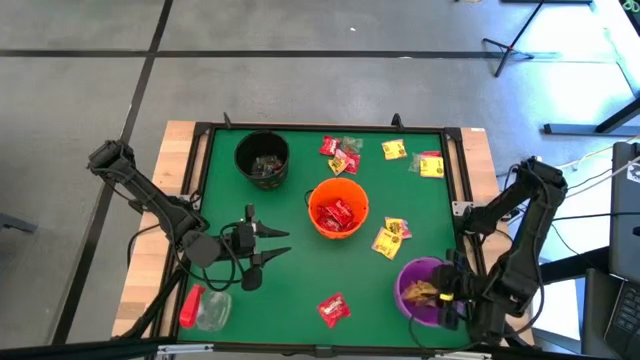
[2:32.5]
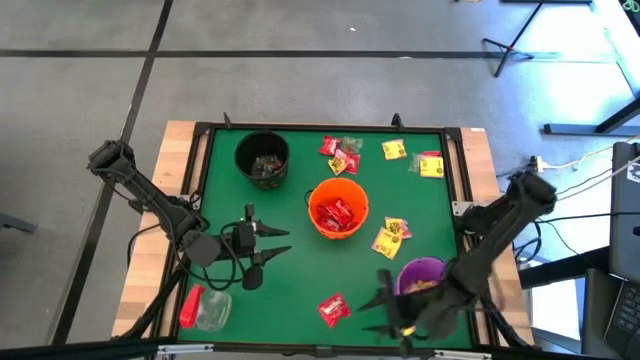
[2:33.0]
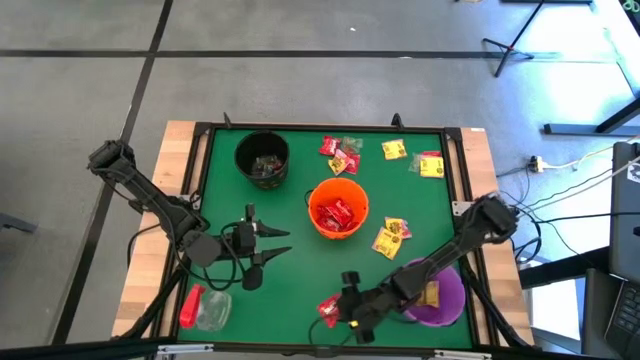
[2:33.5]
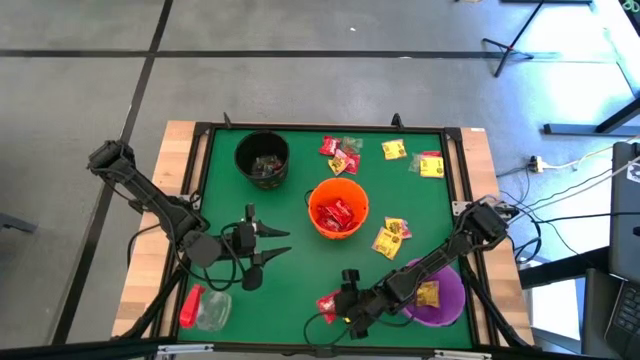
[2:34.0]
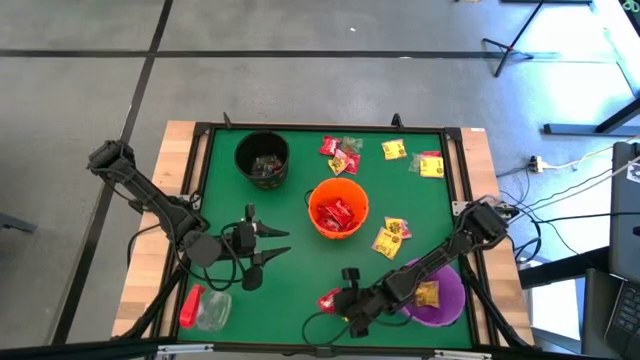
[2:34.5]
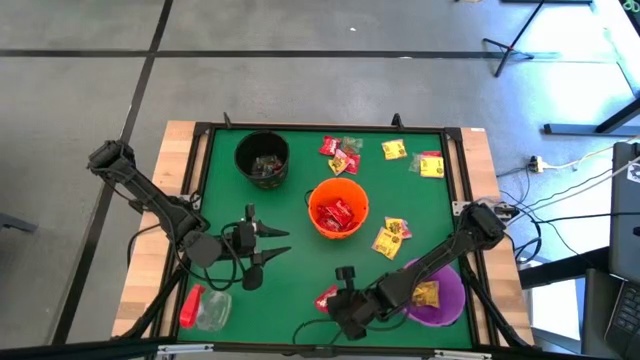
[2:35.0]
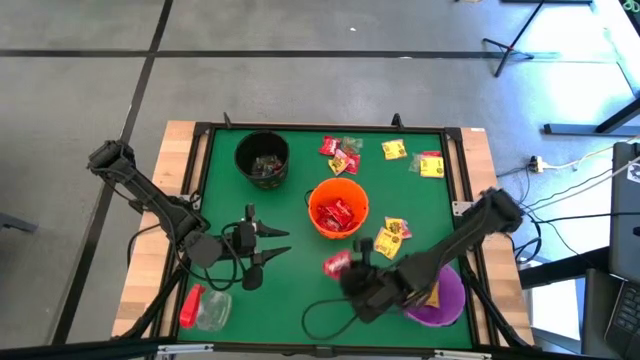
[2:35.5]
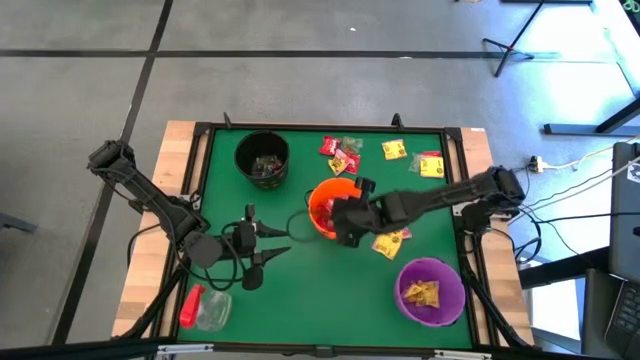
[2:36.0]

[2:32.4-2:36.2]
Task: Sort candy
Put the red candy into the orange bin

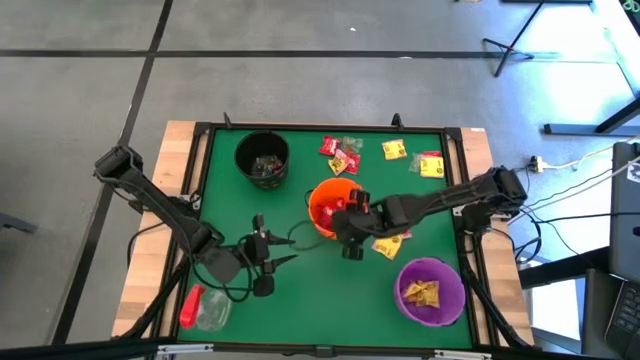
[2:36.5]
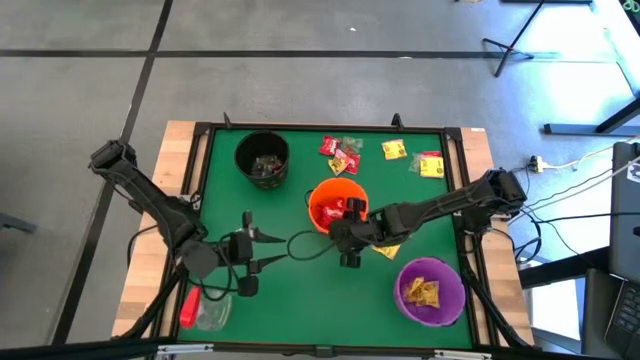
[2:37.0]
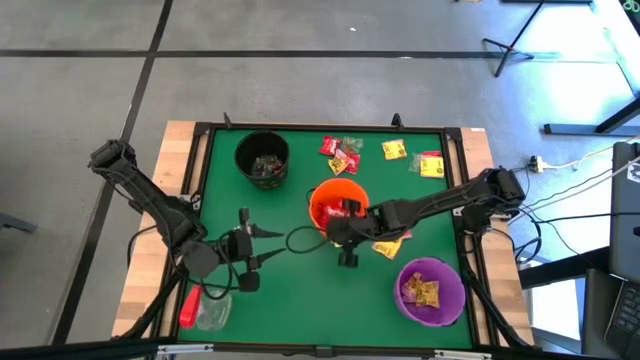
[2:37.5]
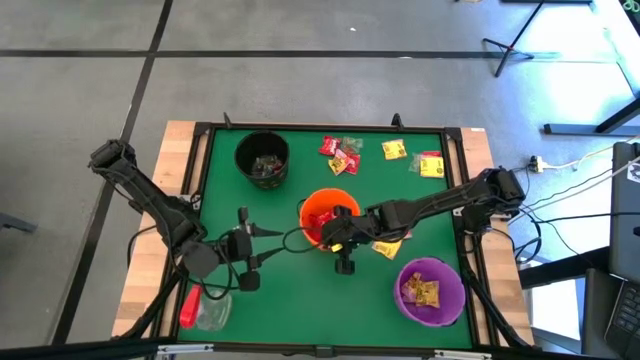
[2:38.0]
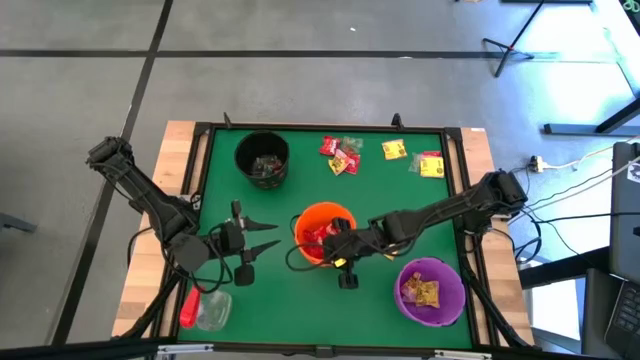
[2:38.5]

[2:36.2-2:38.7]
Adjust the orange bin

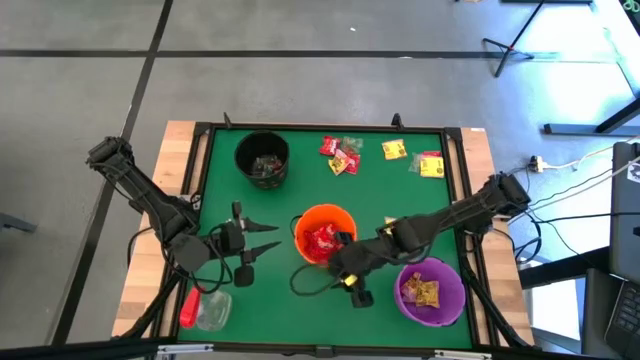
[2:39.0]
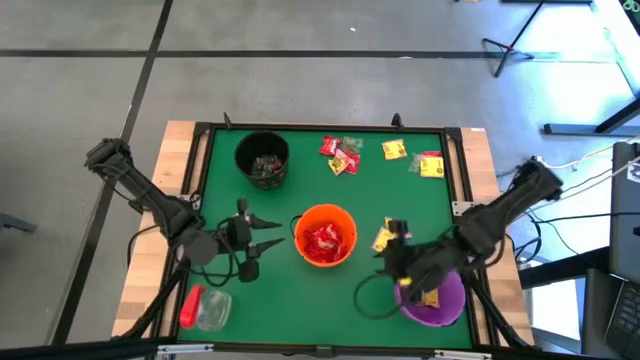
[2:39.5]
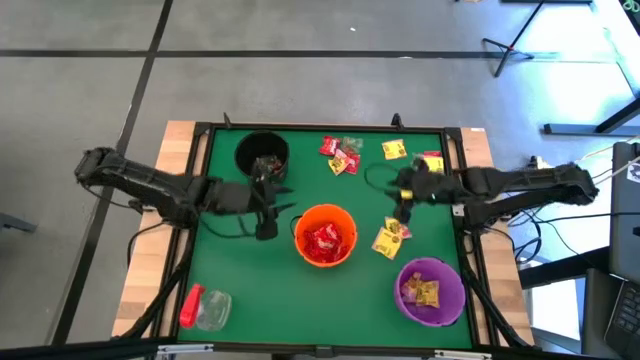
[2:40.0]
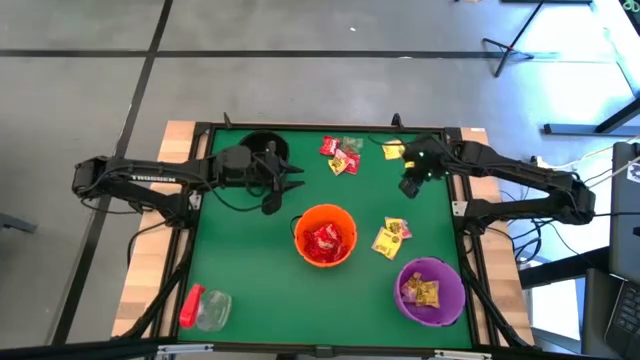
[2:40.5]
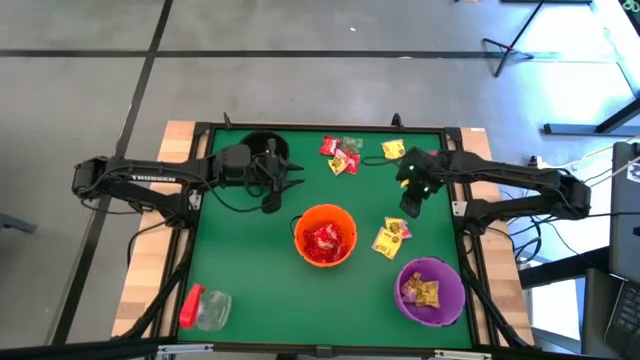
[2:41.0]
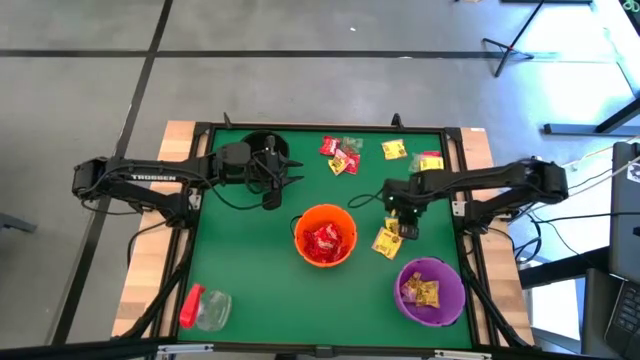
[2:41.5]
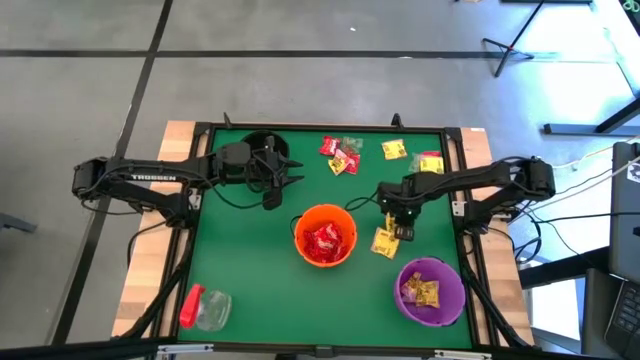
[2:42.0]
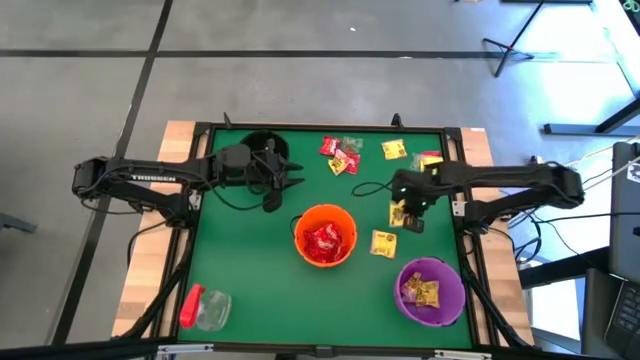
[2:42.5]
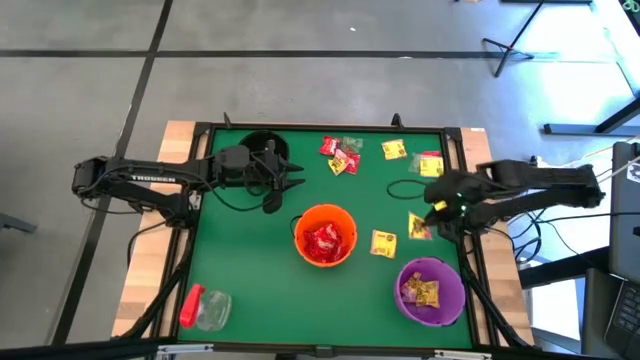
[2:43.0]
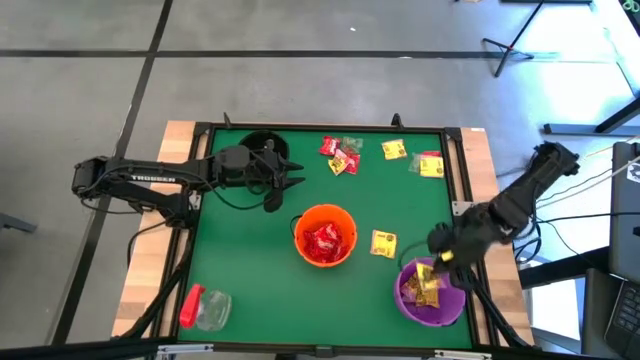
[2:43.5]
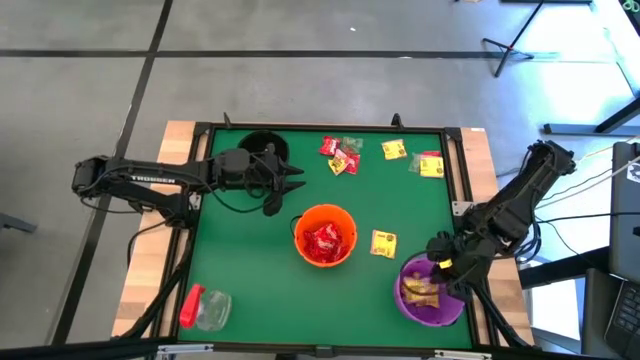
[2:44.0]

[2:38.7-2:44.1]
Put the yellow candy into the purple bin

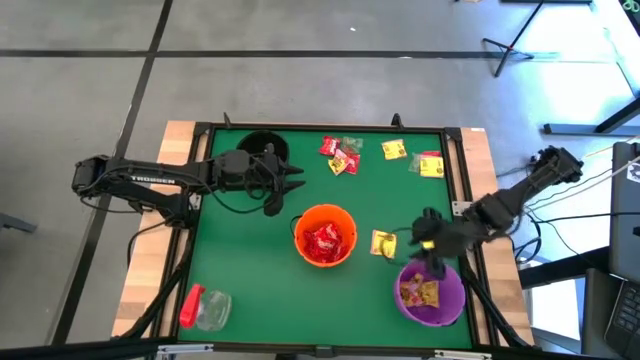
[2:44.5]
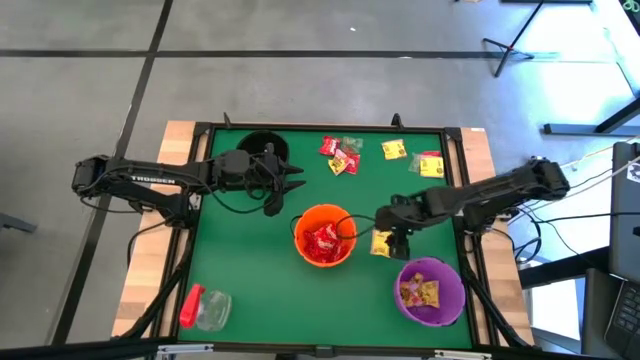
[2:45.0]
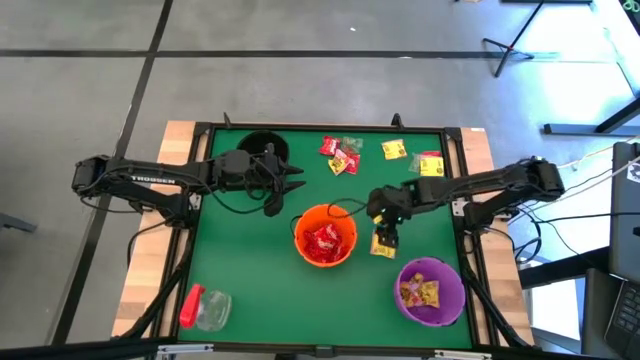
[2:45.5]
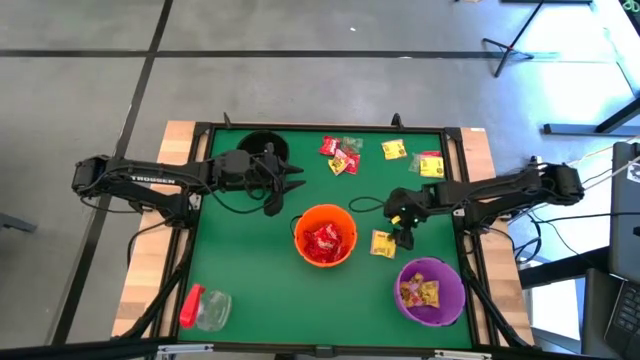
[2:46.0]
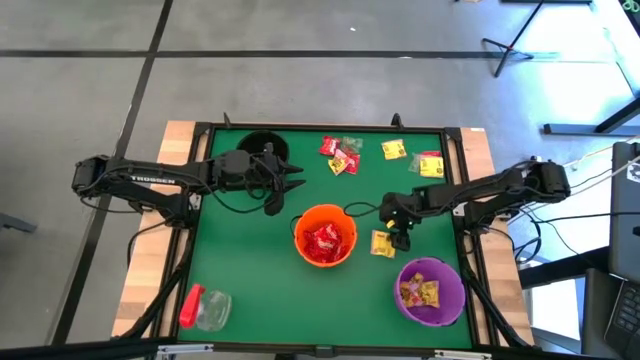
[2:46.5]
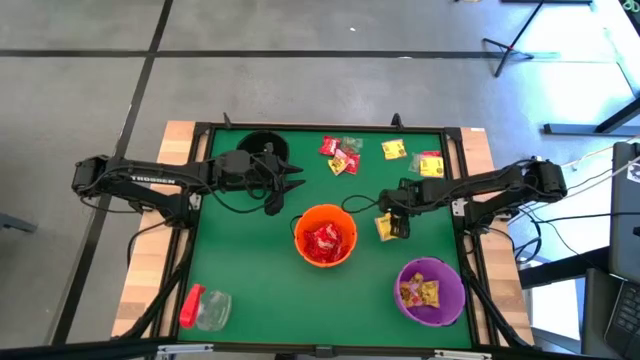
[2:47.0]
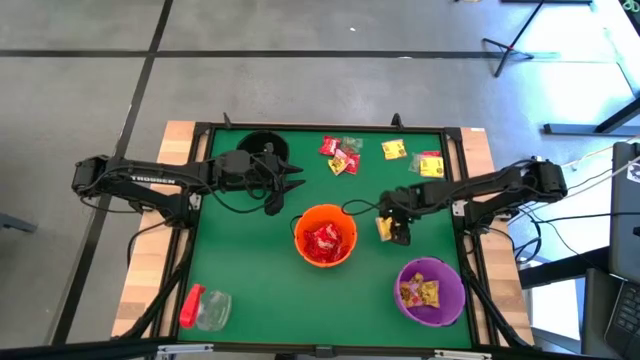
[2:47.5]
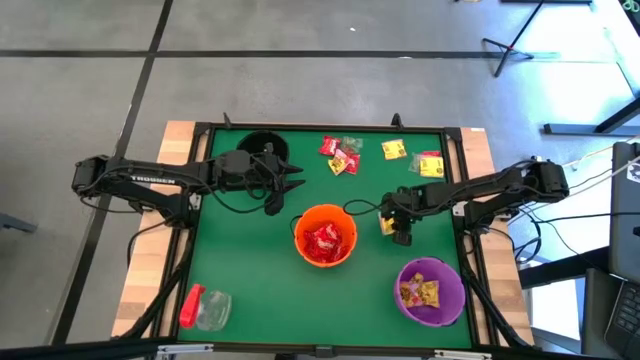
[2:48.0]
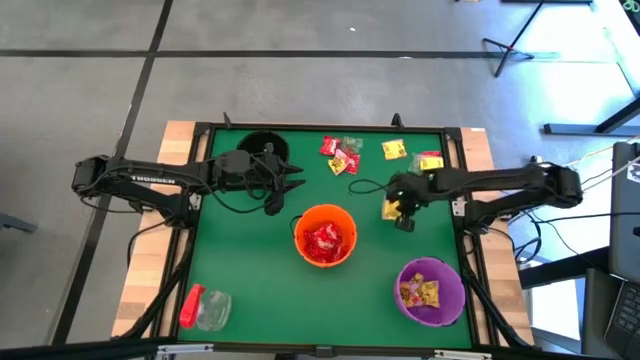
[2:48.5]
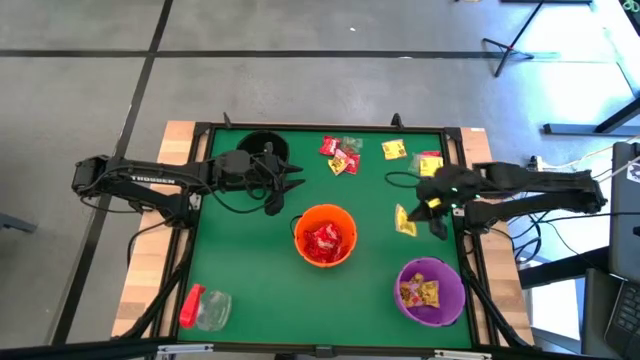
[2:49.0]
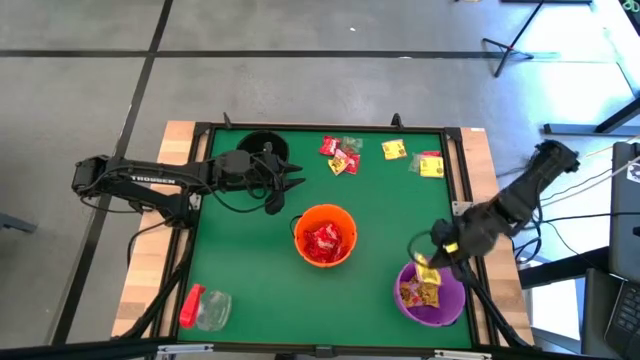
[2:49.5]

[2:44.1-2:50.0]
Put the yellow candy into the purple bin

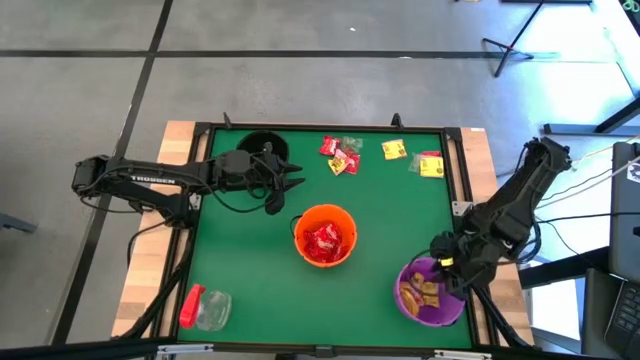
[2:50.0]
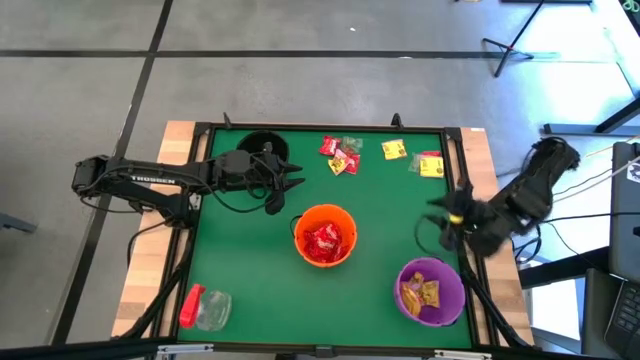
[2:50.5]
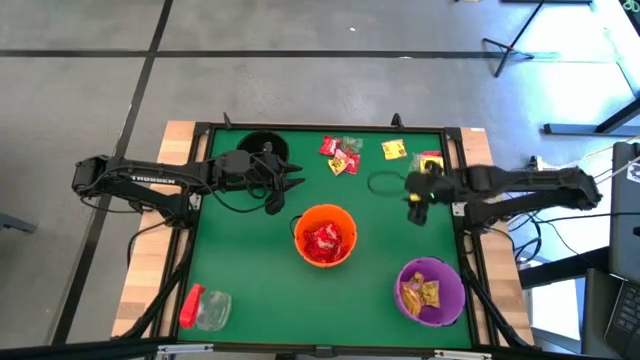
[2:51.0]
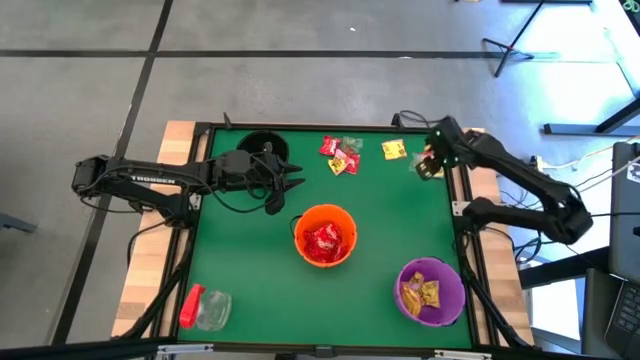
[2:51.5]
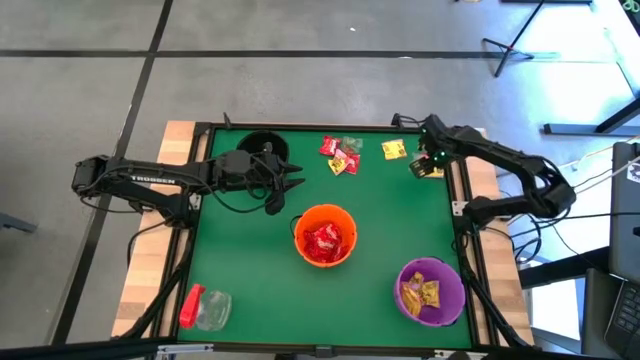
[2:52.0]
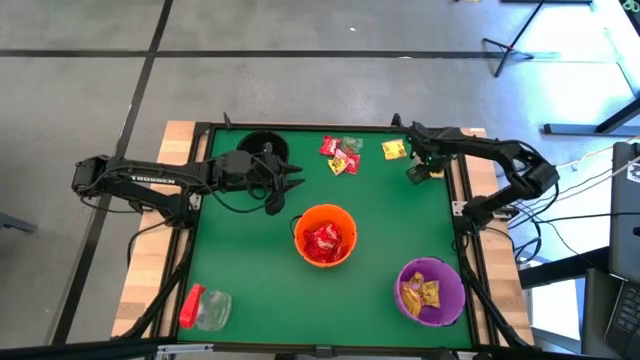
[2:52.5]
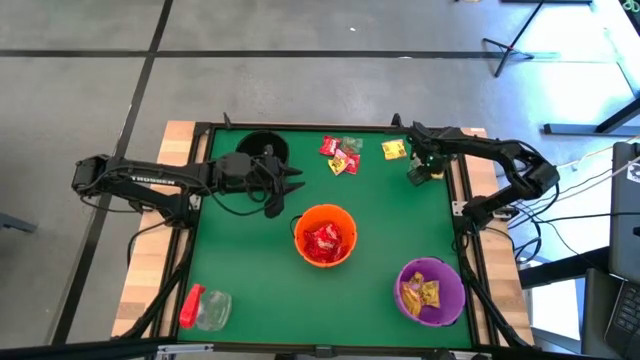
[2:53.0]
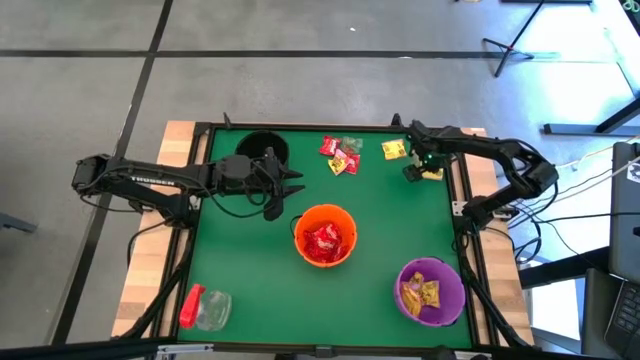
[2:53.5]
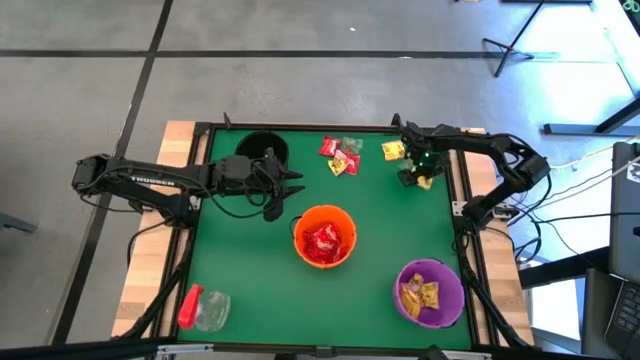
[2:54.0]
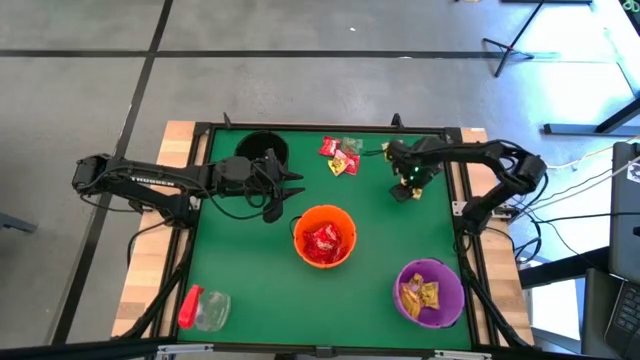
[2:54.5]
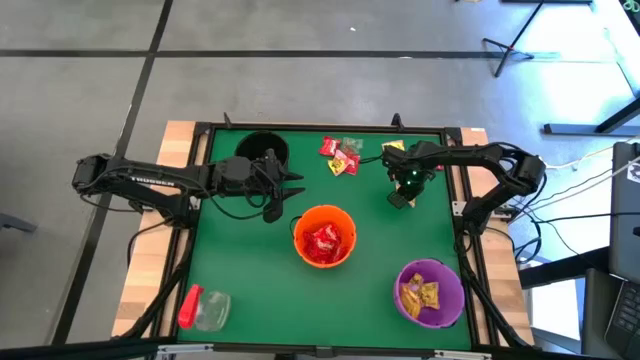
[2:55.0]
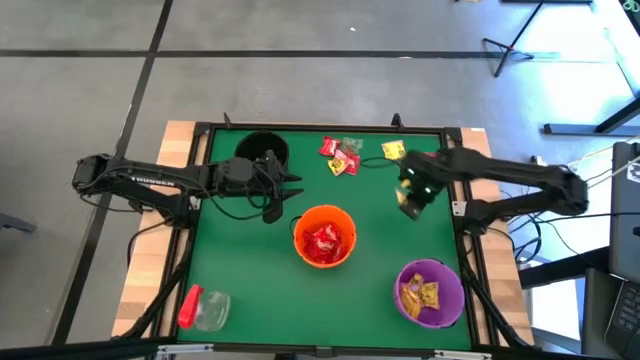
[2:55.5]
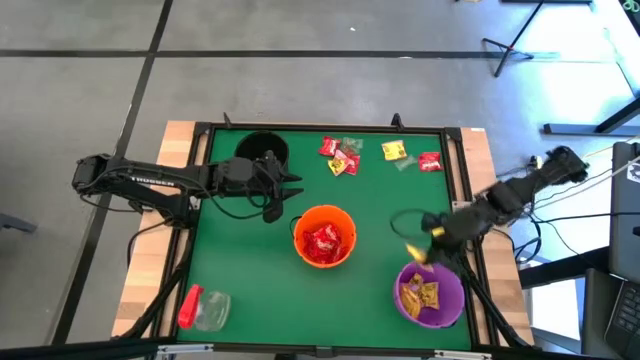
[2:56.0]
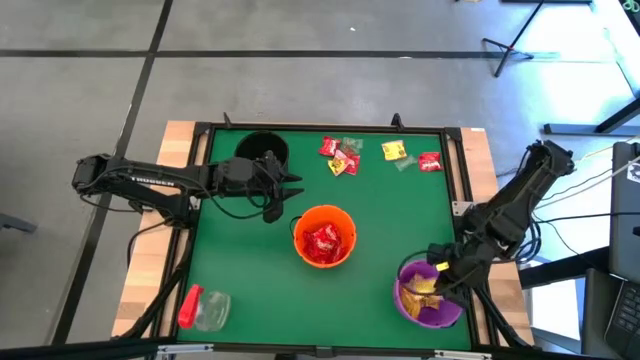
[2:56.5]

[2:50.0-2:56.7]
Put the yellow candy into the purple bin
